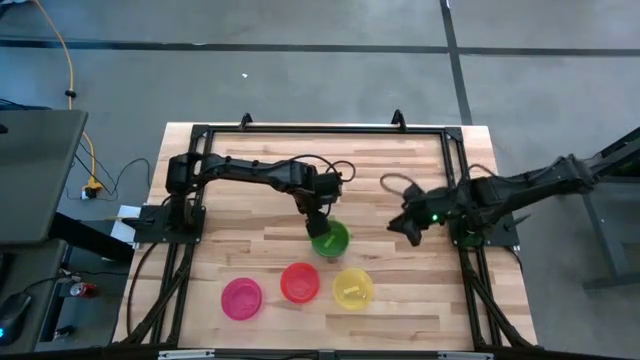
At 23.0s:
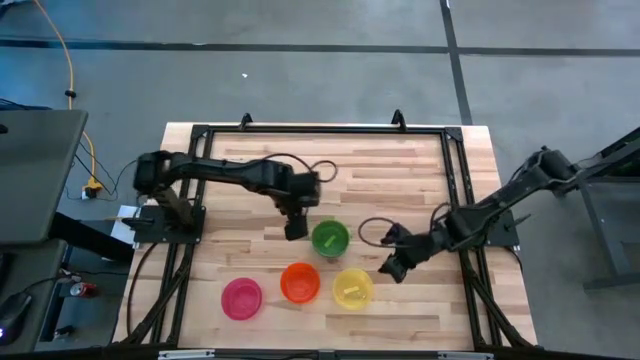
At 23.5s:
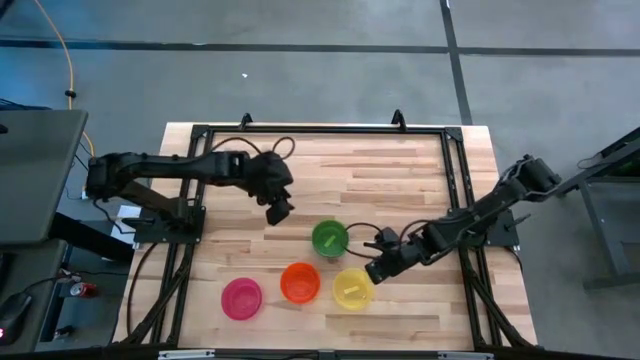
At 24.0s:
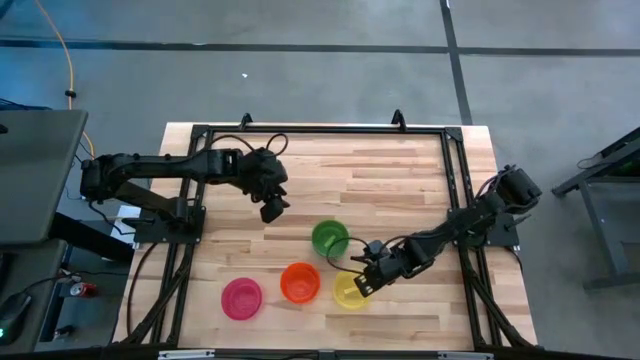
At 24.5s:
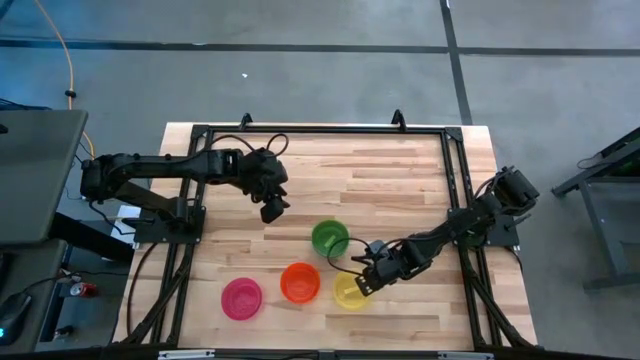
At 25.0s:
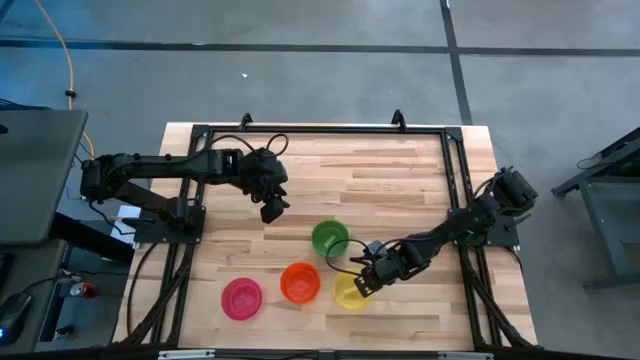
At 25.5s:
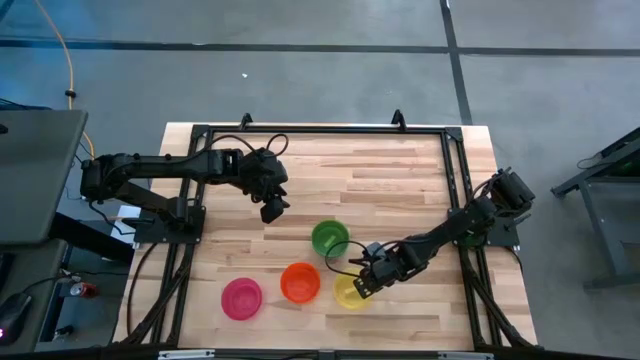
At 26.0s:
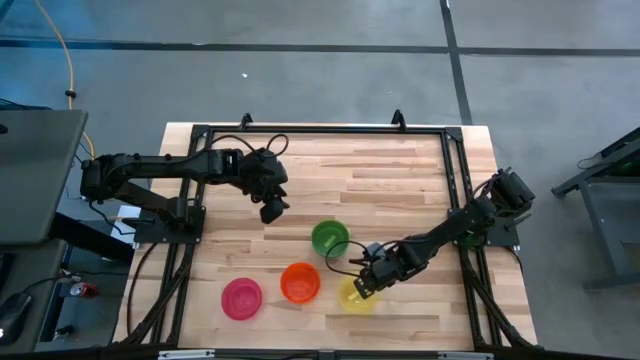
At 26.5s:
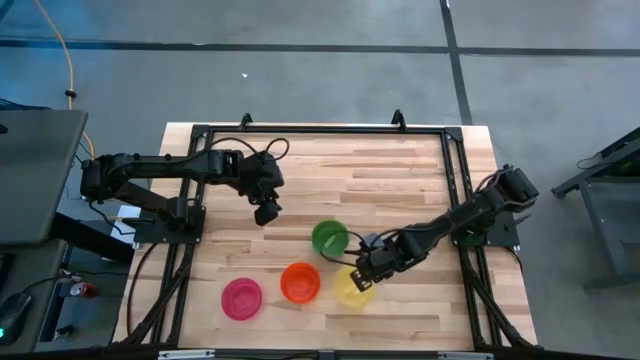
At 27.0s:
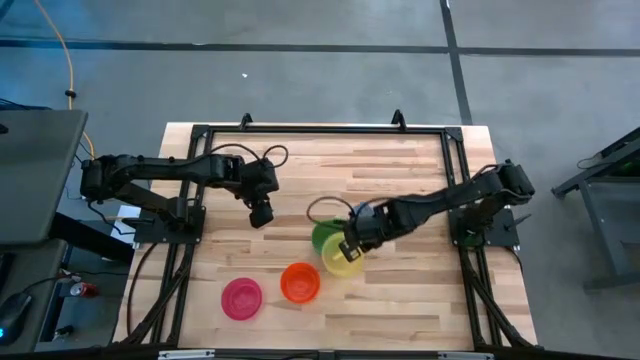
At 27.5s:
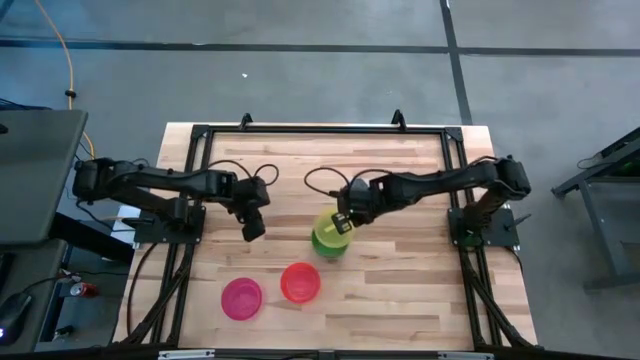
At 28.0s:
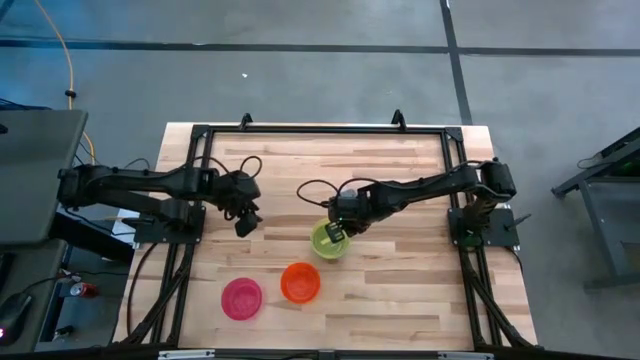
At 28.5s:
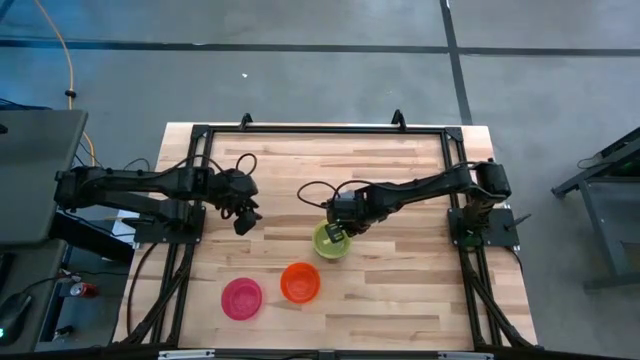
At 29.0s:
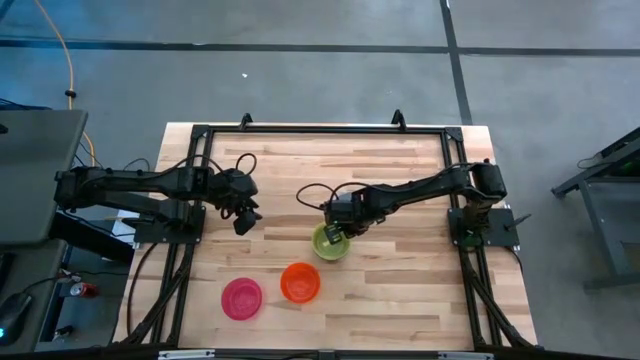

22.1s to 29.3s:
Task: Nest bowls inside each other
Stack the yellow bowl on the green bowl

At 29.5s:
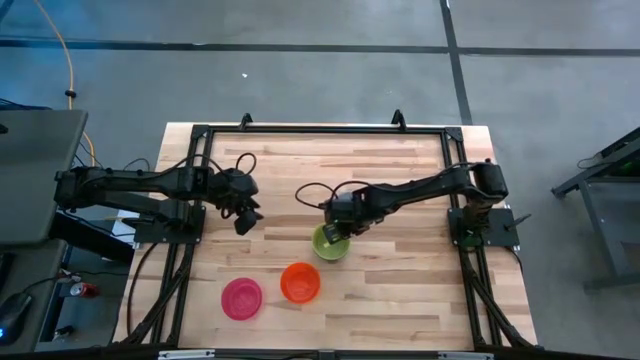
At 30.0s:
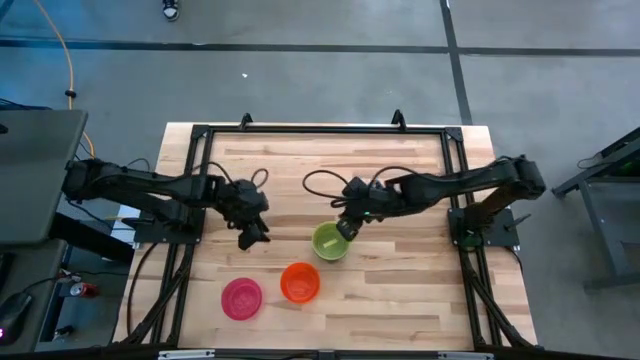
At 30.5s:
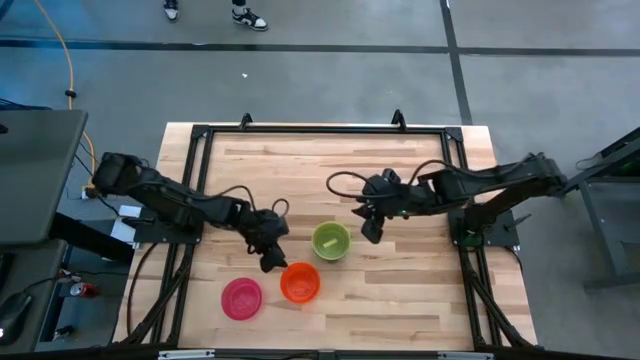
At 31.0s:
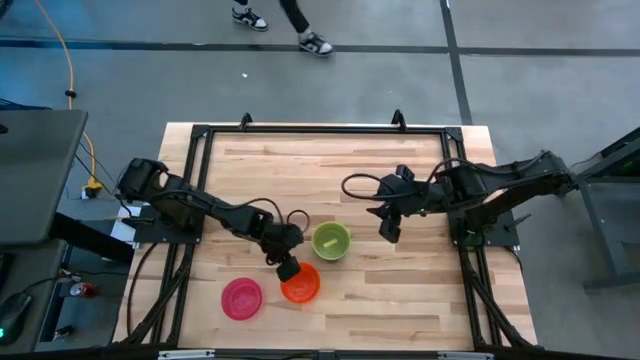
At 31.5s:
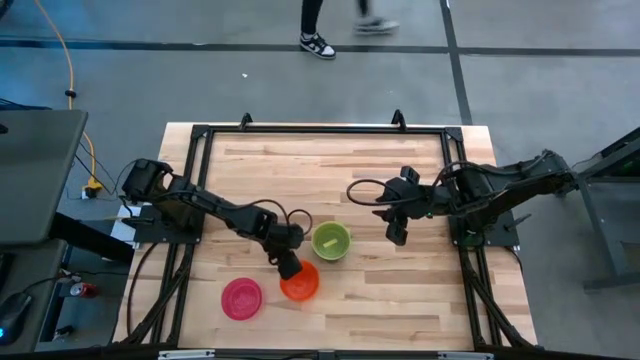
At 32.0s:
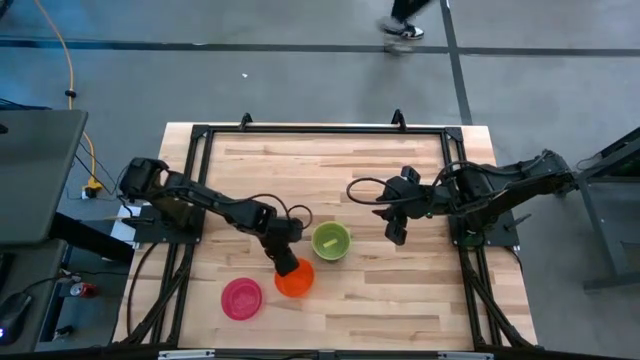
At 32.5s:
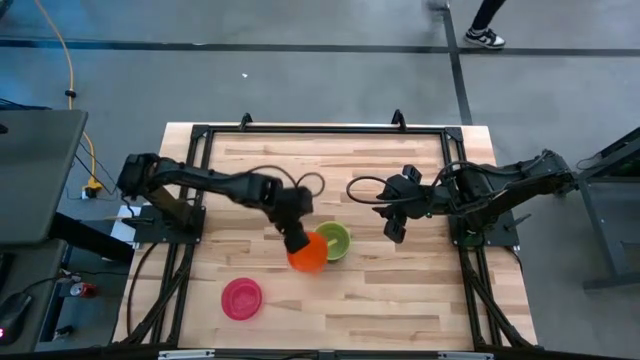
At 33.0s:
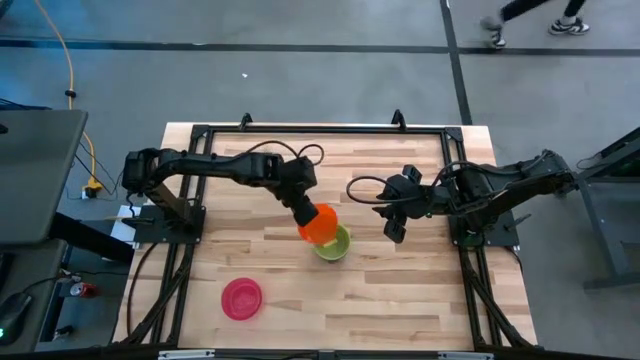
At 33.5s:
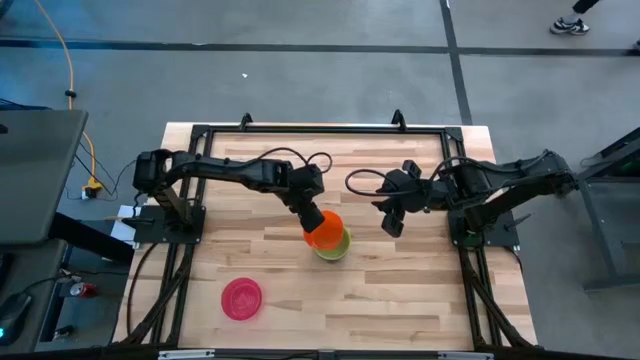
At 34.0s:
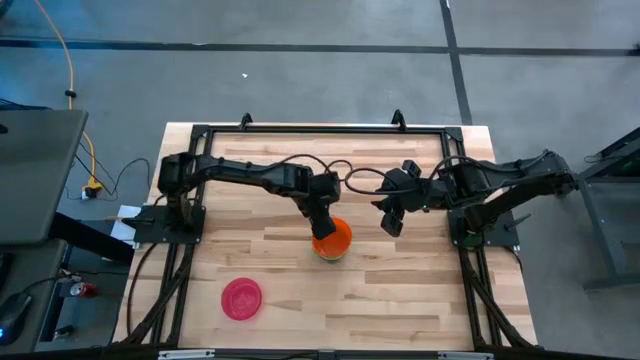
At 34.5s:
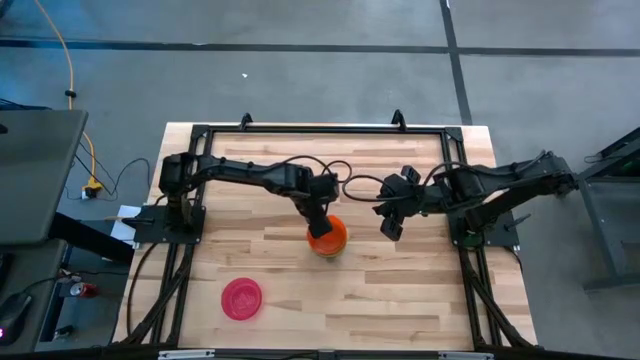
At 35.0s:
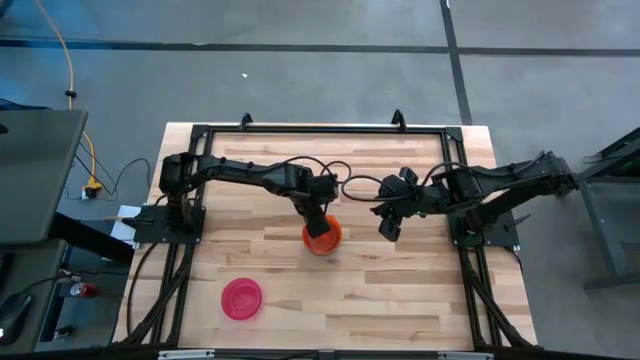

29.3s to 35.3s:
Stack the orange bowl on the yellow bowl

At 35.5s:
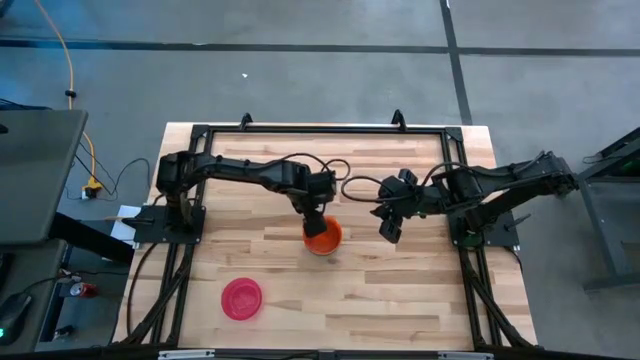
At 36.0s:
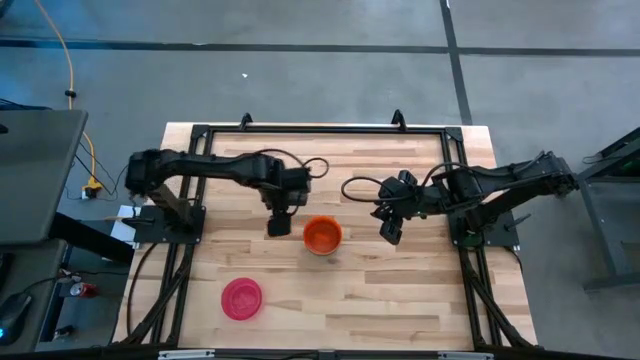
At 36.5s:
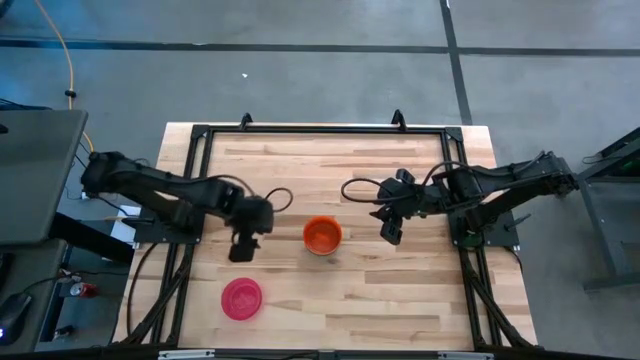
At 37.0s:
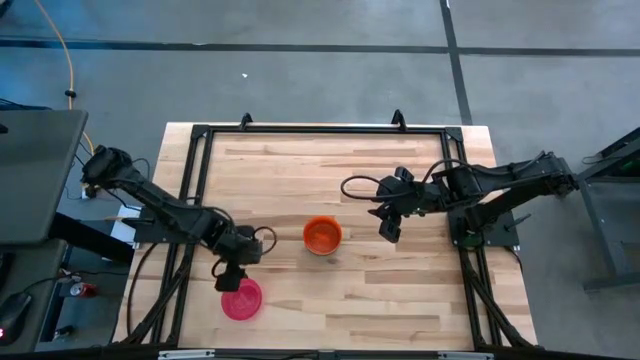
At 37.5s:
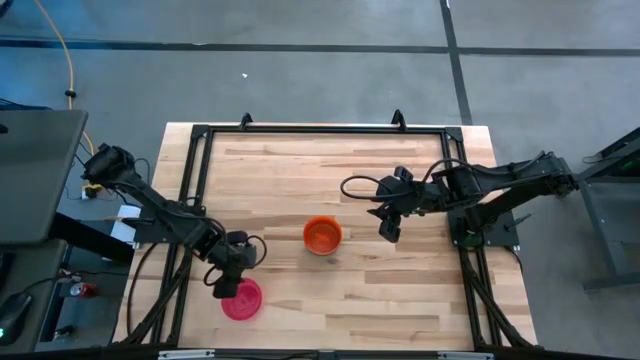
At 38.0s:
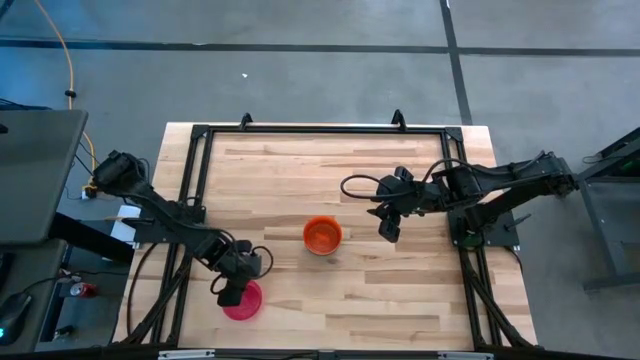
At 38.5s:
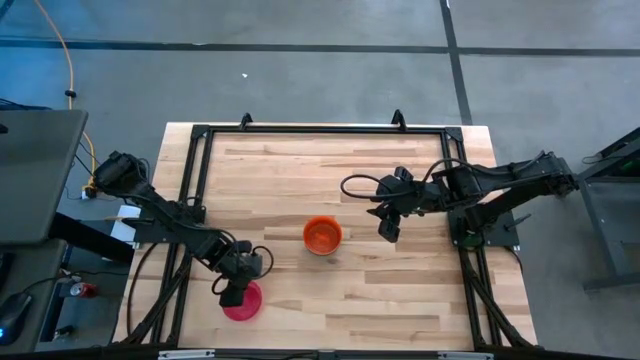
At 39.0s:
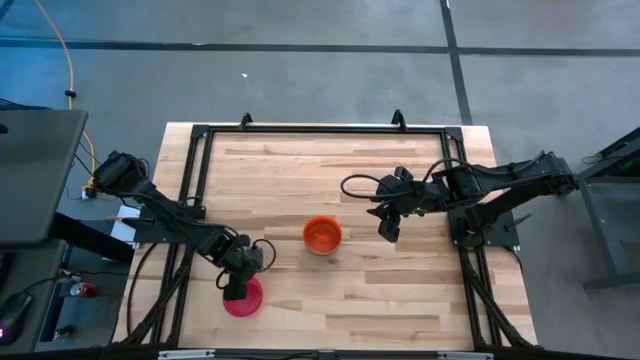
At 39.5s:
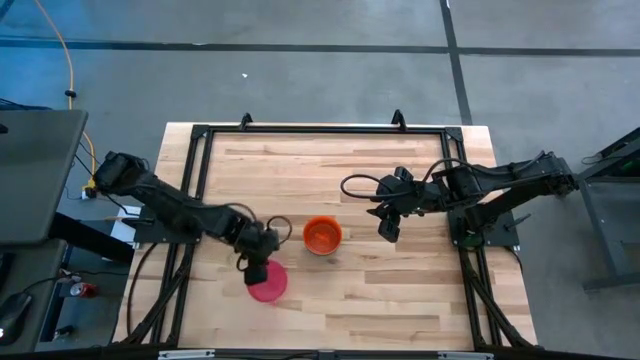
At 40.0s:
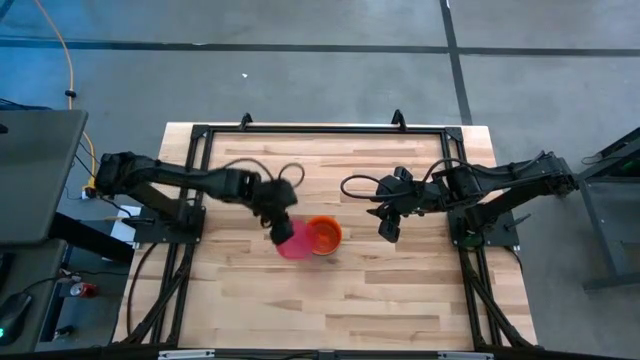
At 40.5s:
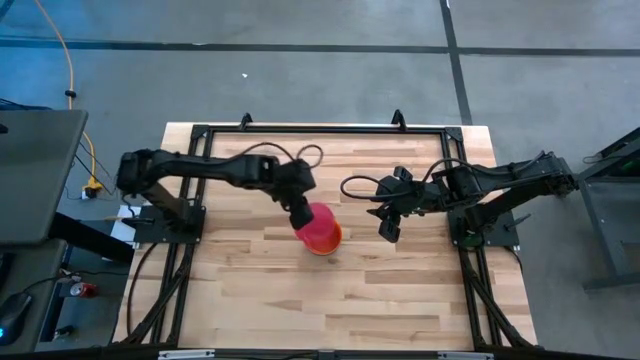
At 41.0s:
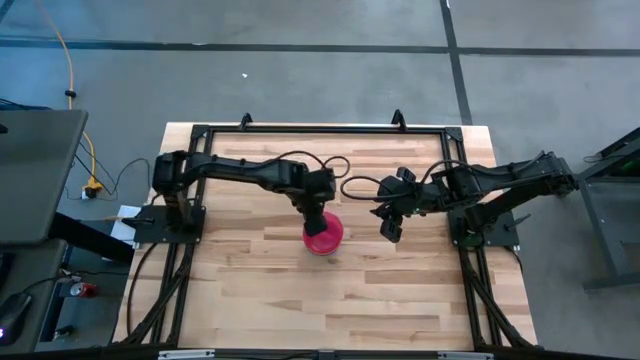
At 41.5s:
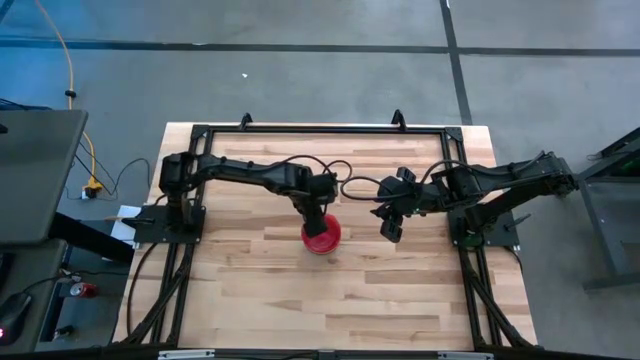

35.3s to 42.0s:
Stack the pink bowl on the orange bowl

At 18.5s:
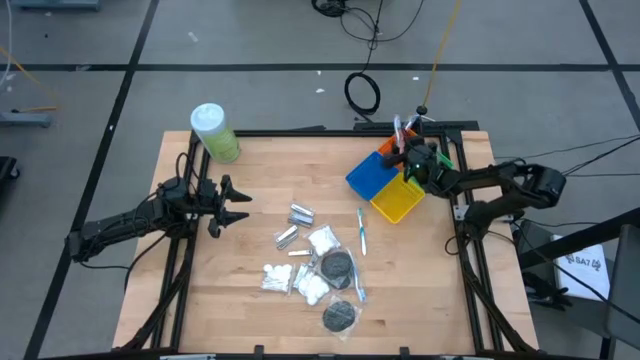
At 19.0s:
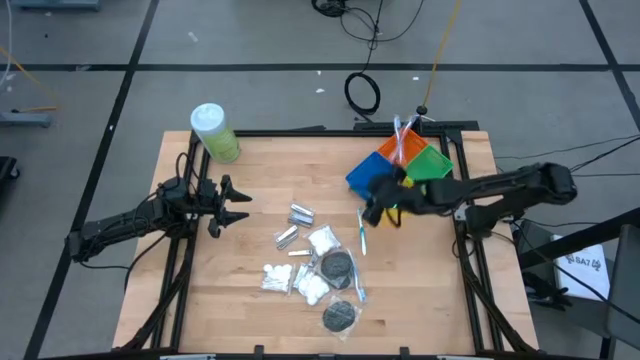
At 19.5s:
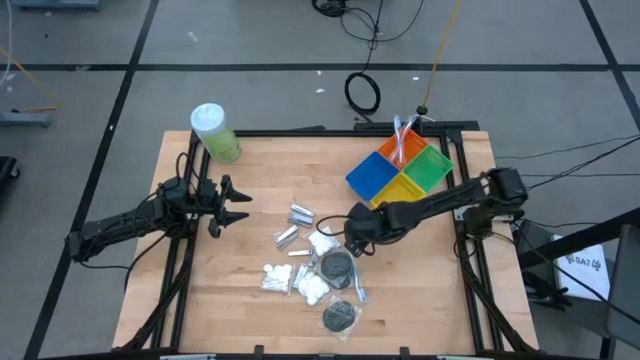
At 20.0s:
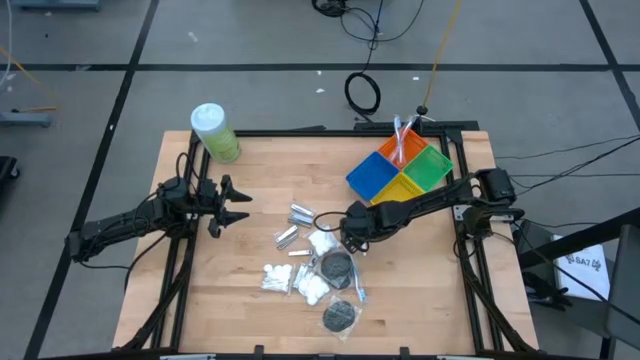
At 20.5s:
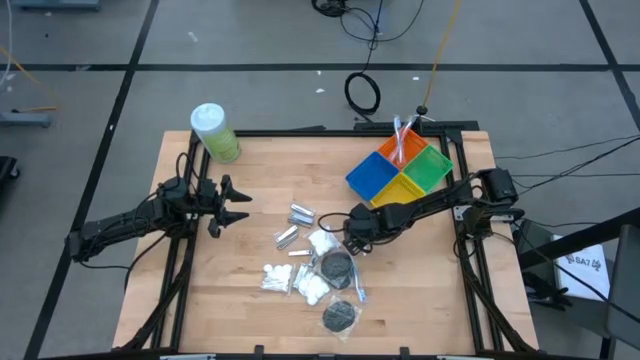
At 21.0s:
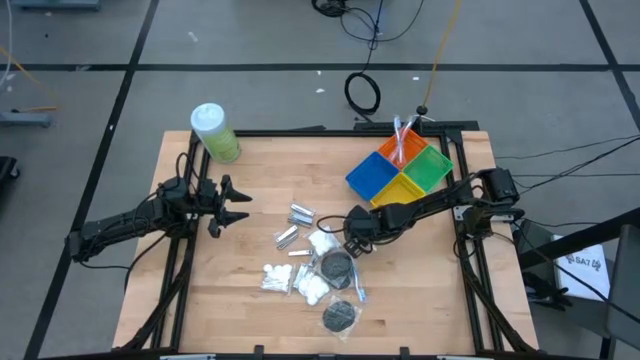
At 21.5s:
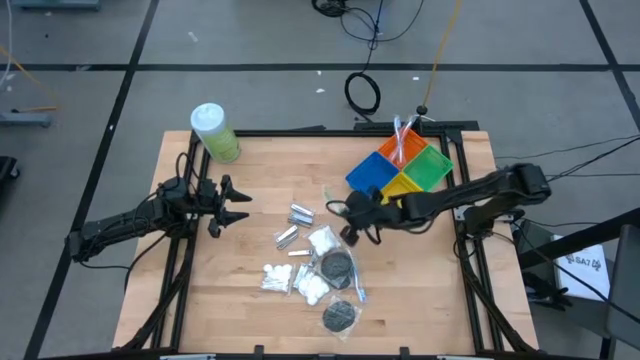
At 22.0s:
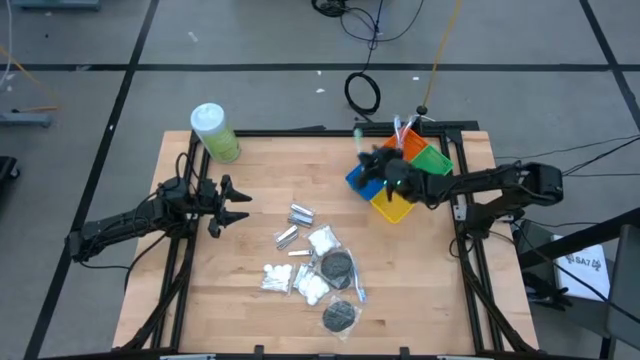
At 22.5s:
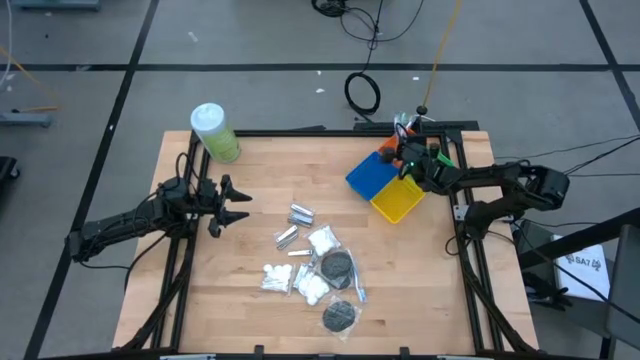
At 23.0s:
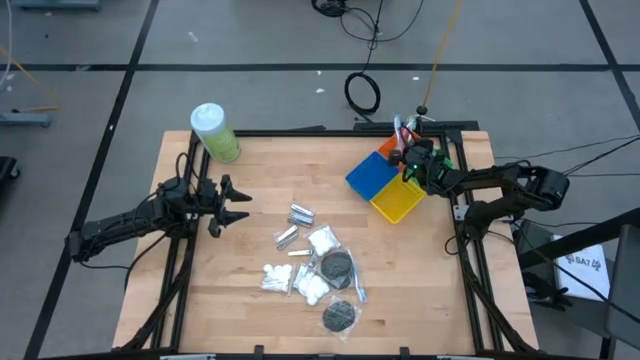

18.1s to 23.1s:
Task: Pick & Place Travel size toiletries
Put the green toothbrush into the orange bin
